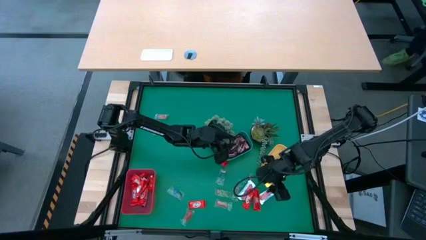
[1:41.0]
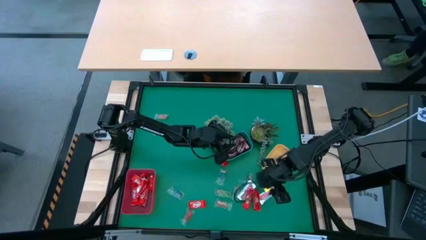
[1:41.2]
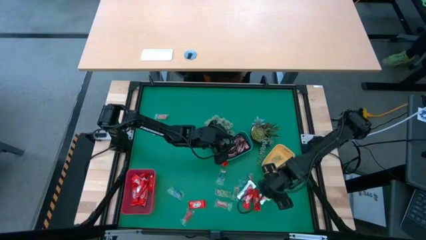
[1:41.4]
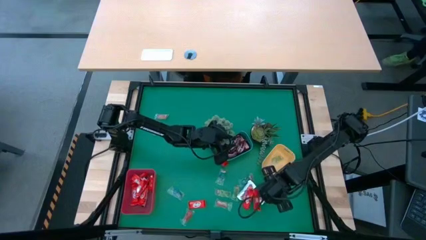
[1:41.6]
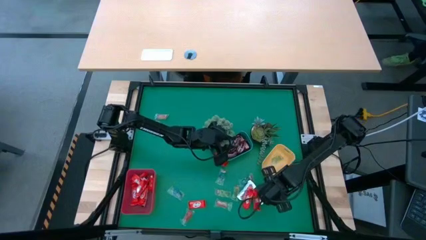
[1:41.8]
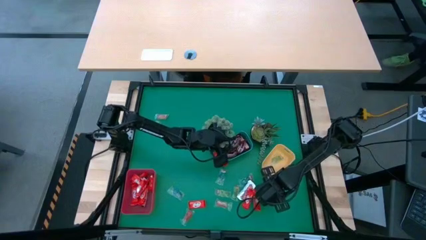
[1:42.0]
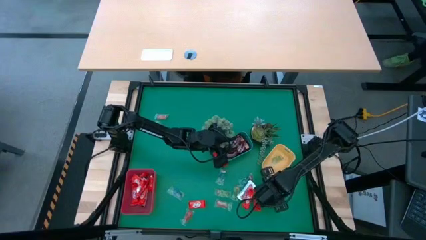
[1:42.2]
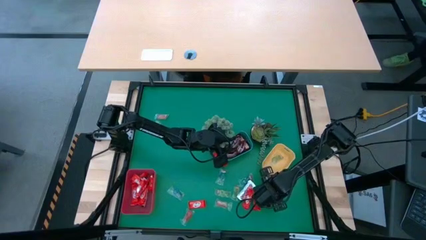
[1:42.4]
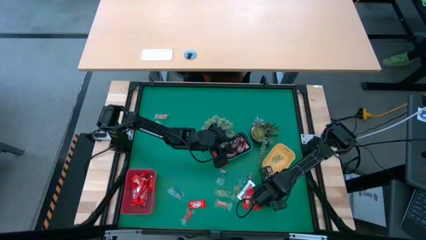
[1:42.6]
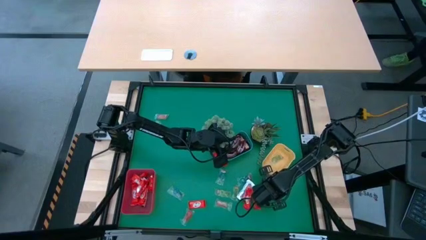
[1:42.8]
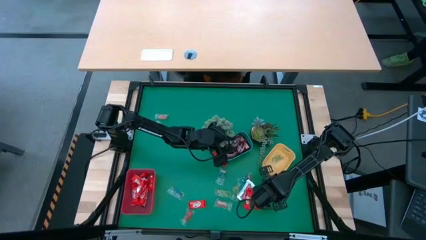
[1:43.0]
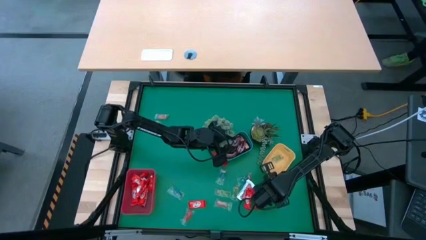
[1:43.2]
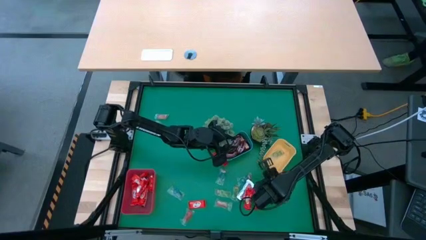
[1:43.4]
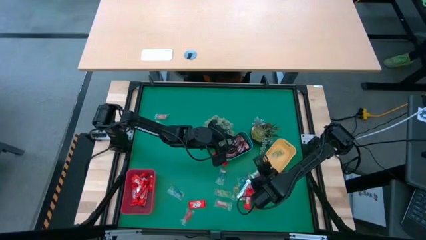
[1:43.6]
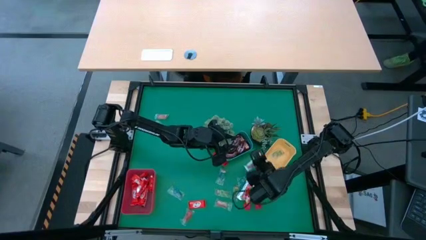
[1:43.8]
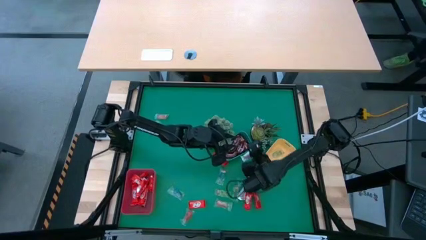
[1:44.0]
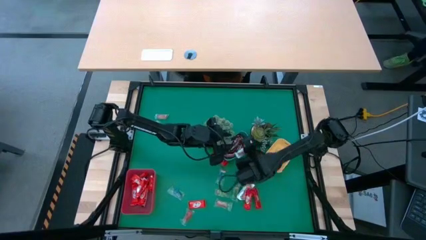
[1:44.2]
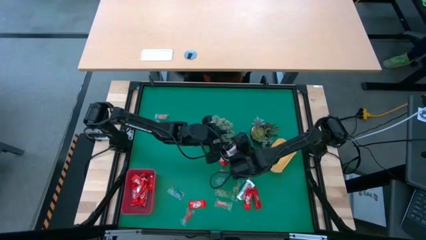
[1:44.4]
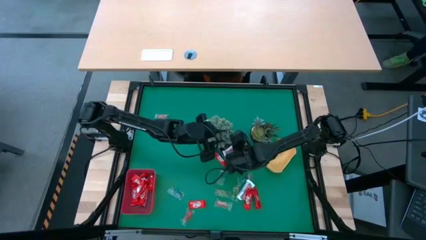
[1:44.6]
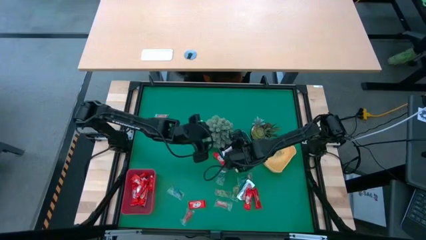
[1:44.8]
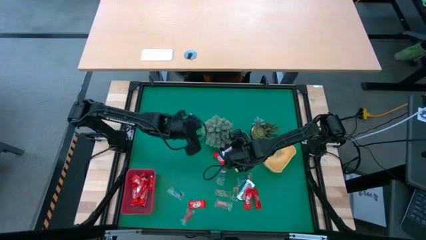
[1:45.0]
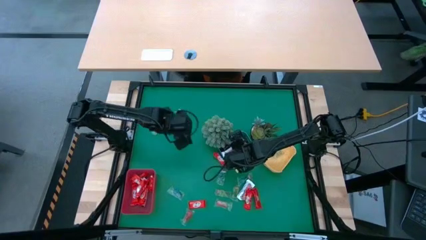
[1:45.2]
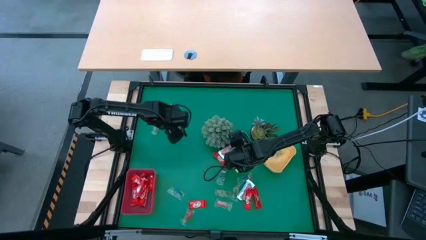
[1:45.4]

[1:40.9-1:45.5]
Task: Organize candy in baskets
Put the white chocolate into the blue bin

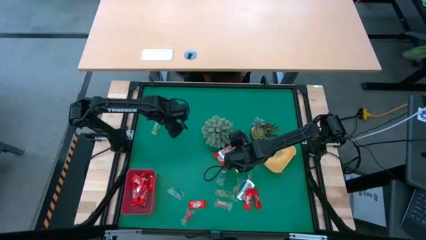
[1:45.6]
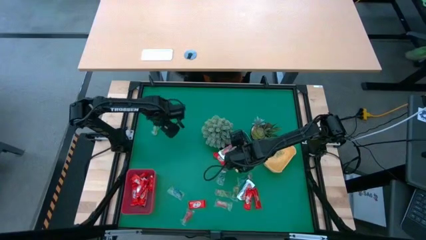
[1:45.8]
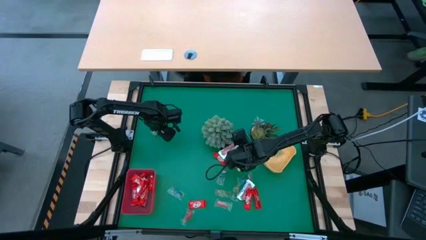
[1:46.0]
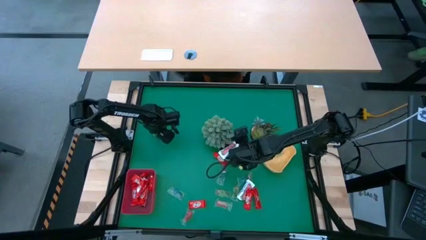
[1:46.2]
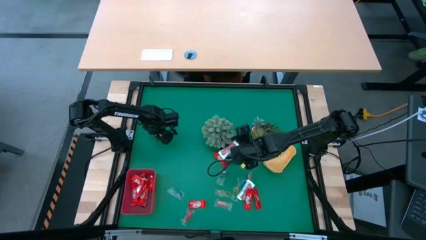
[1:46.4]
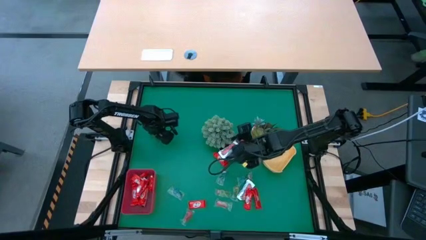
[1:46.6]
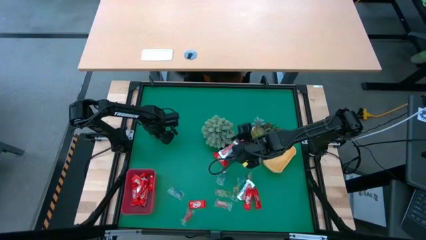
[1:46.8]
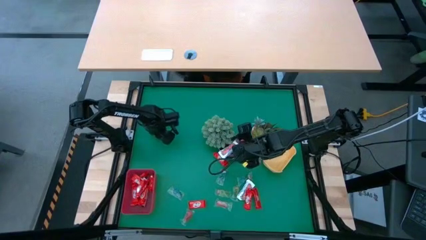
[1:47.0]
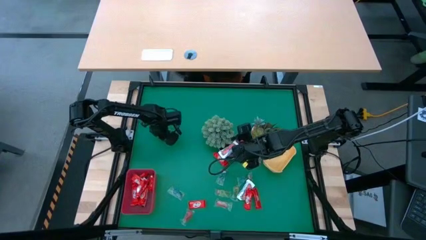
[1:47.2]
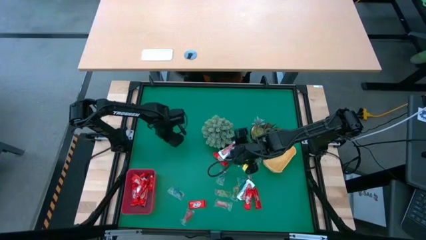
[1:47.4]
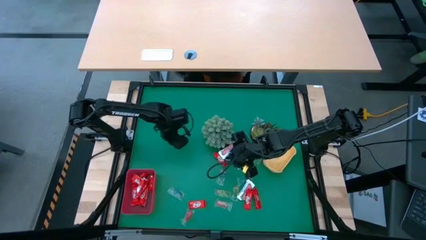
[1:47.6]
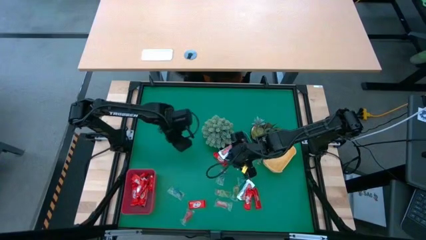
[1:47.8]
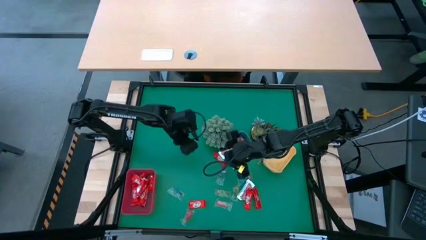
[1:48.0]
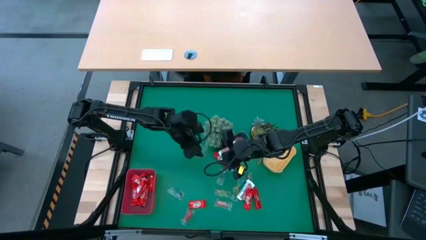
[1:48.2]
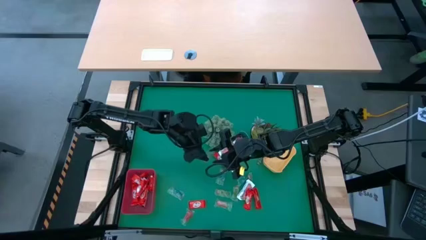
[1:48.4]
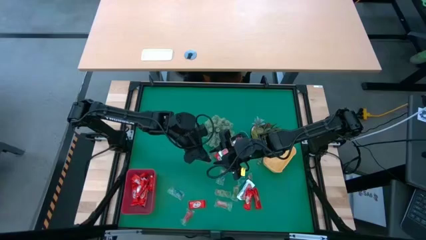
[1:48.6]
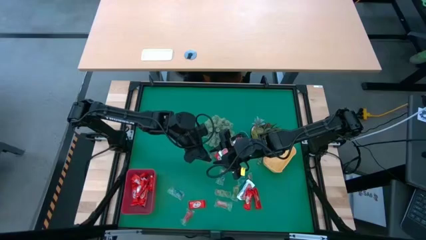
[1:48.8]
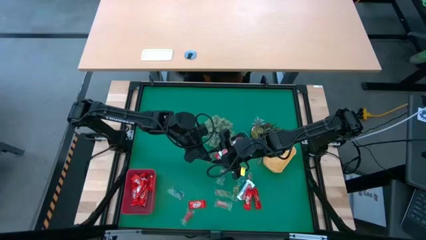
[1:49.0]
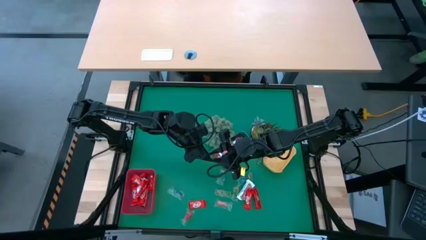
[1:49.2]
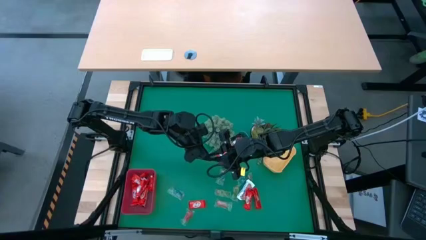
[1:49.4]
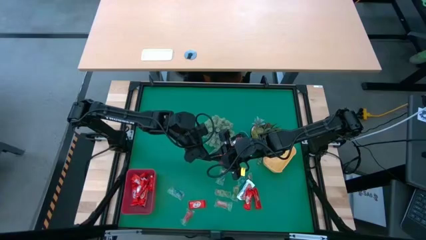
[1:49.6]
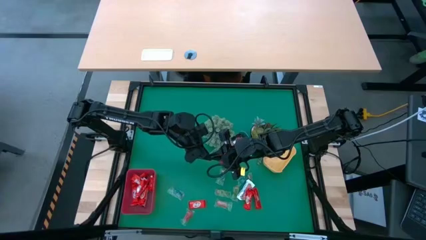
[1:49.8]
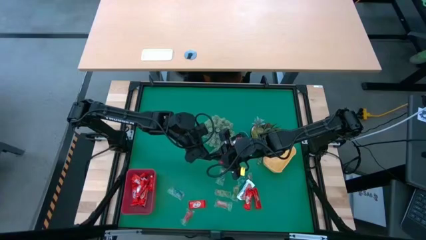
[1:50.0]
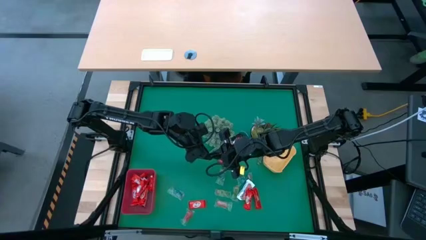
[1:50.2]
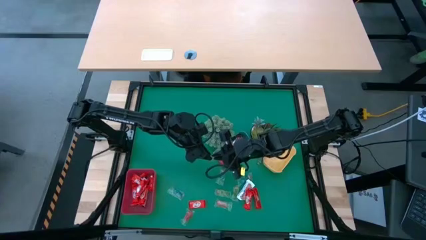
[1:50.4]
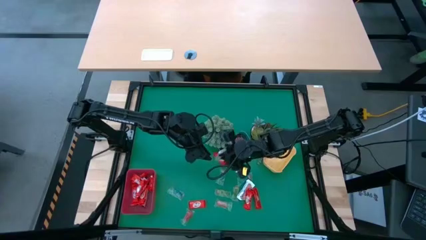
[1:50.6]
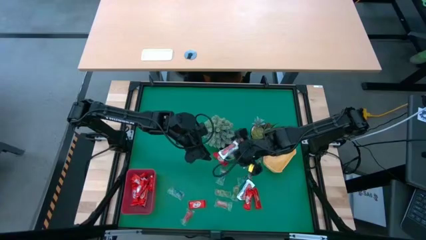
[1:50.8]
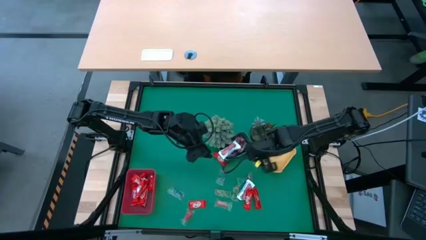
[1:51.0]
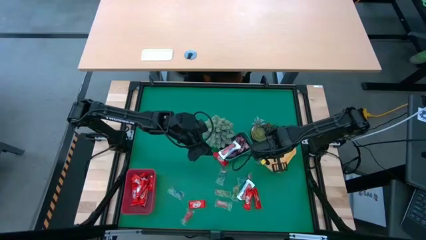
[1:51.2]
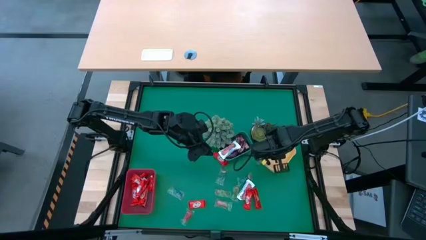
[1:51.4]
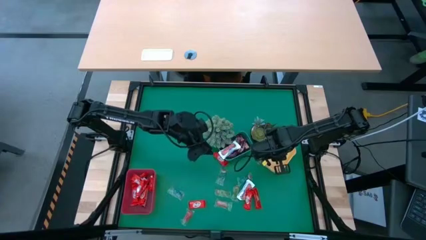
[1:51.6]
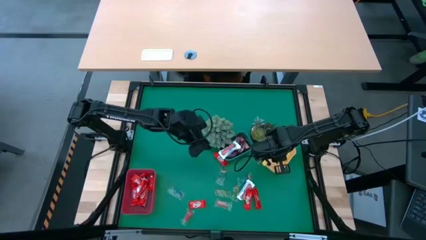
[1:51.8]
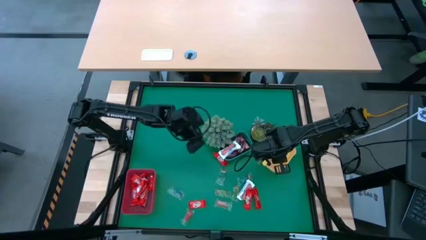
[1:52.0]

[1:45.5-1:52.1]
Put the green gummy into the yellow bin

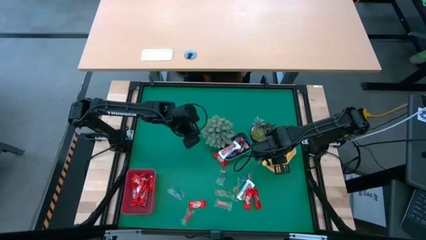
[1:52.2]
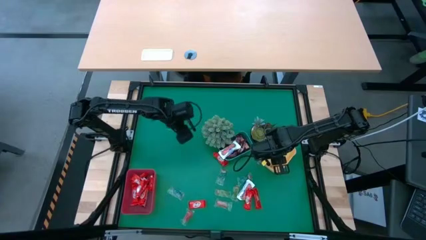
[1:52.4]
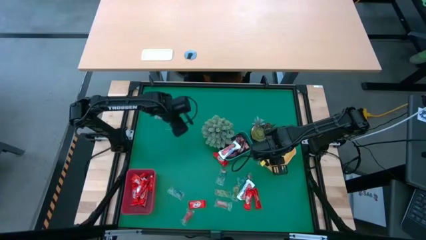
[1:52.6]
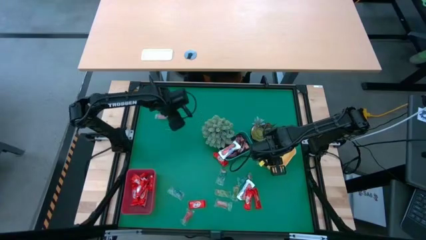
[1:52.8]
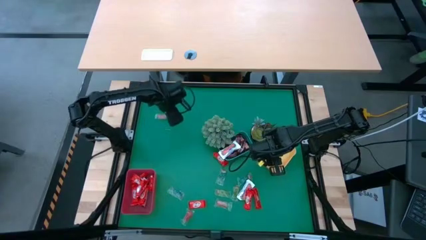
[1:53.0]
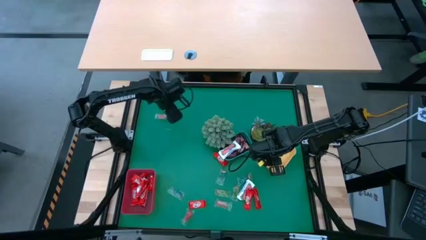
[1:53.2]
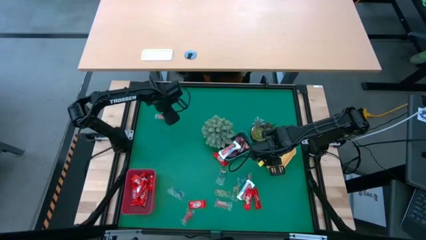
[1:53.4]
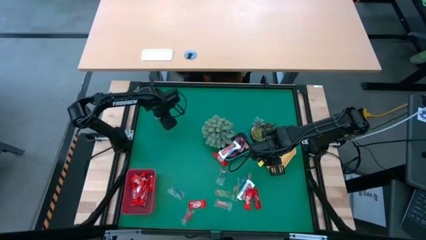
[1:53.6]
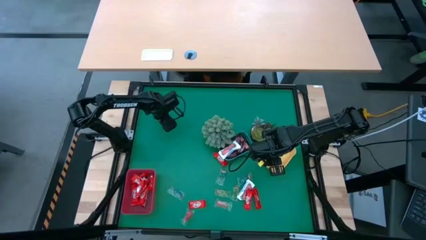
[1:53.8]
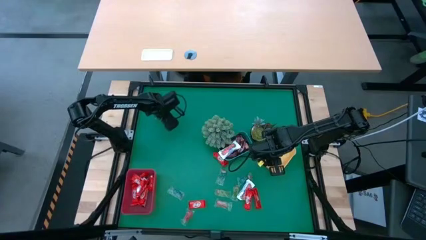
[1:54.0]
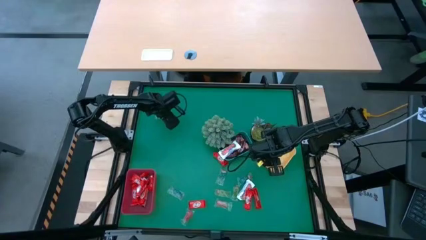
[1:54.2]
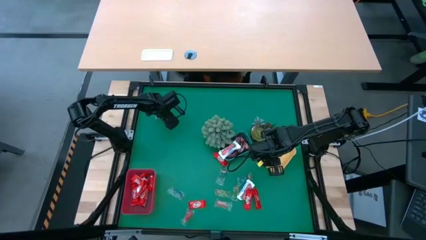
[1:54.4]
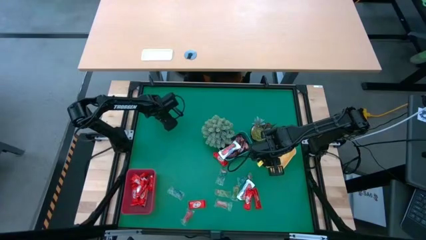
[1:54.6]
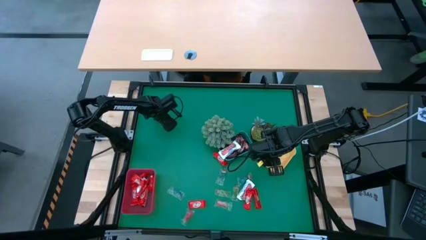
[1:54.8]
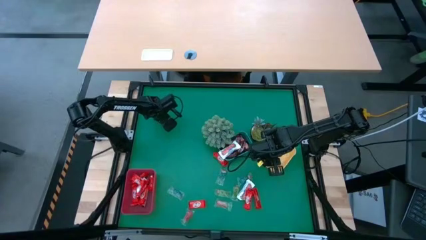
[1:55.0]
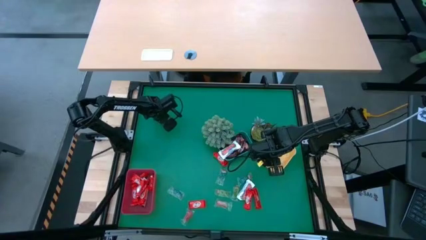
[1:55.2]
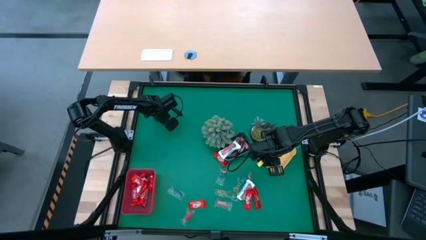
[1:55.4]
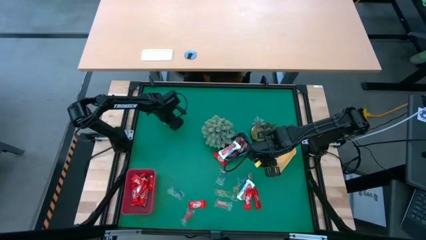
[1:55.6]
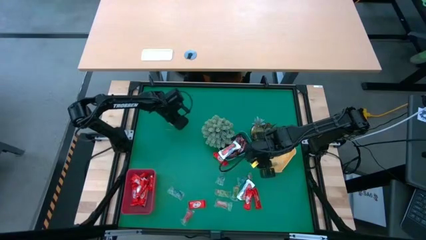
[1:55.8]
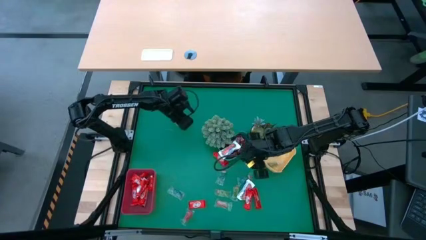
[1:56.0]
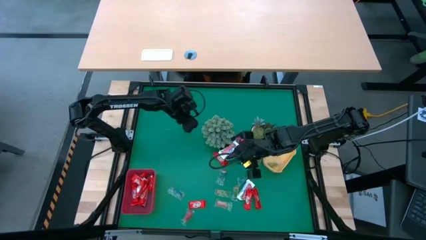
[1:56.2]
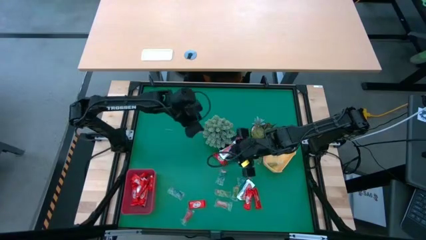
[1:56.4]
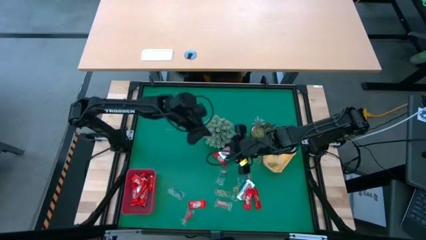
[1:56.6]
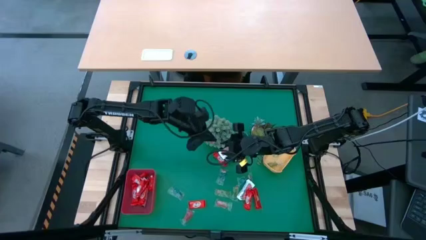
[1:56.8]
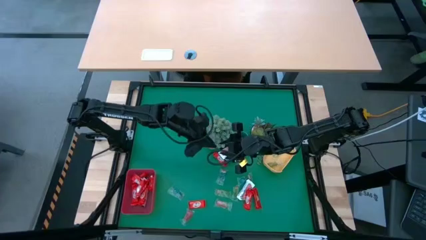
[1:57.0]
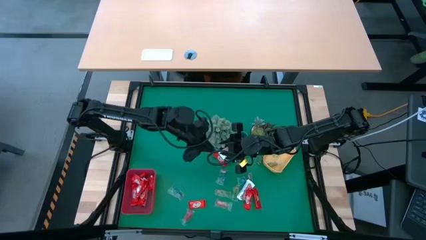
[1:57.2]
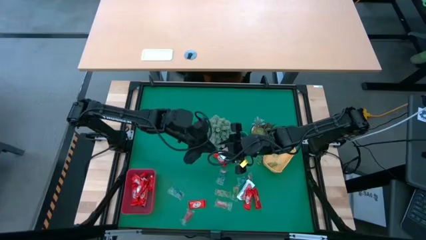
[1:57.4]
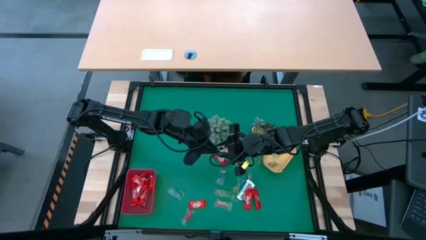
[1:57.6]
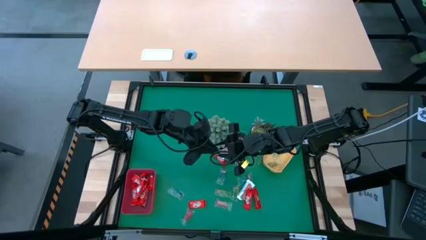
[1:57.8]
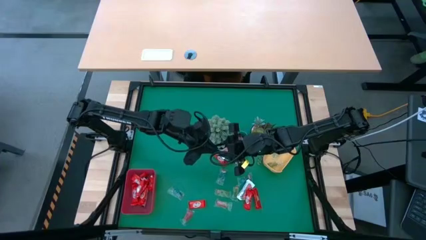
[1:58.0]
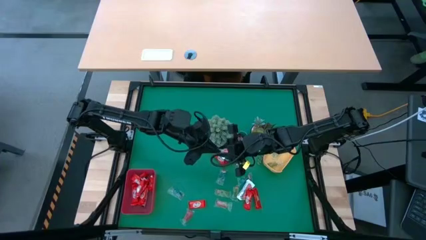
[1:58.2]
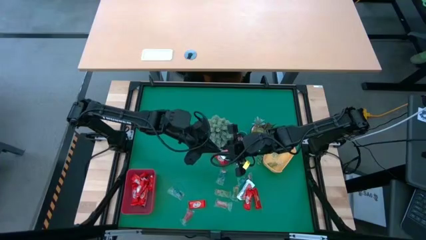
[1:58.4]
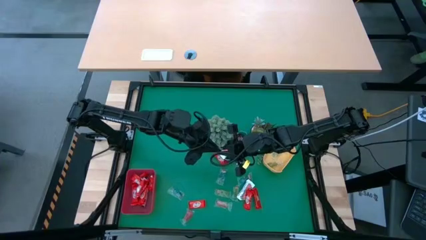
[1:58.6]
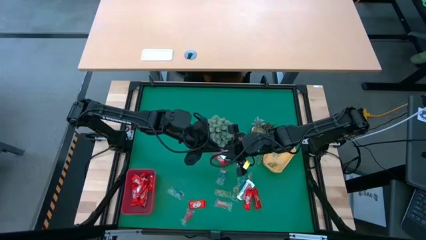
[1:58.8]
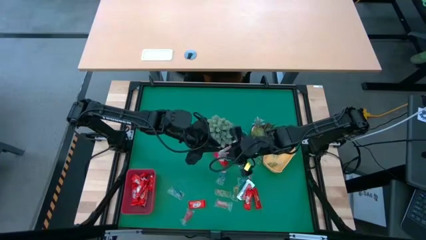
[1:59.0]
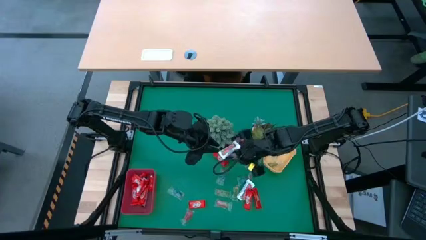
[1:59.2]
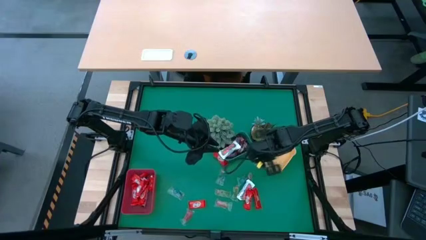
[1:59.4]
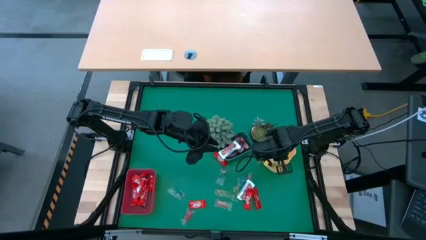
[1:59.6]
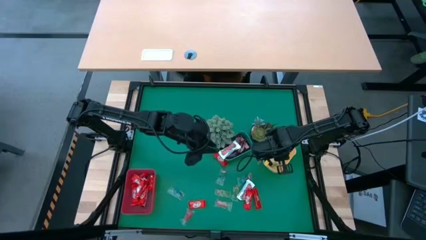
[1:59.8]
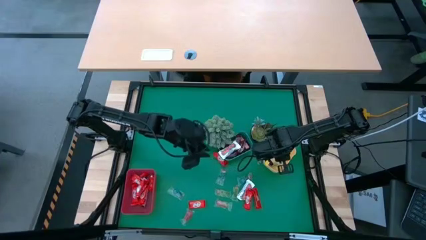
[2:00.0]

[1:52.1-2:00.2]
Put the orange gummy into the yellow bin
